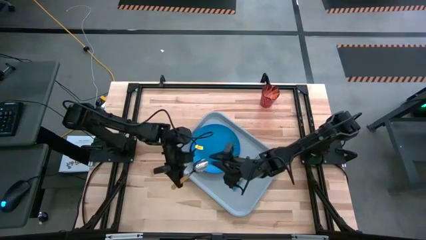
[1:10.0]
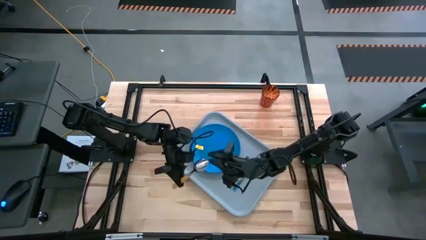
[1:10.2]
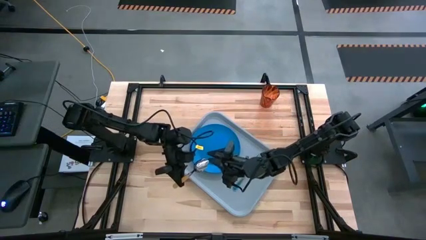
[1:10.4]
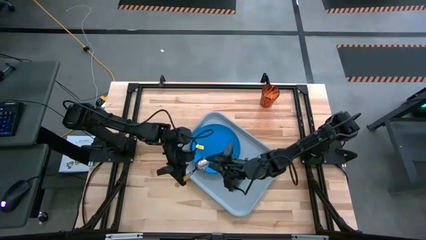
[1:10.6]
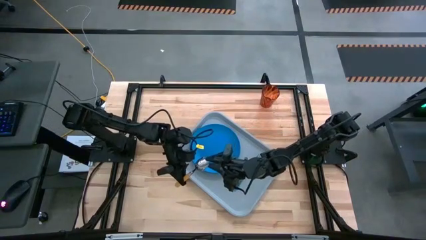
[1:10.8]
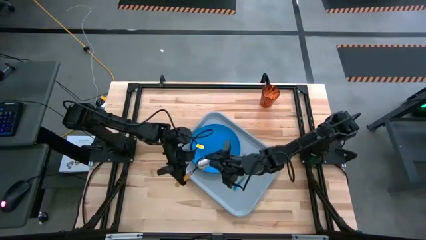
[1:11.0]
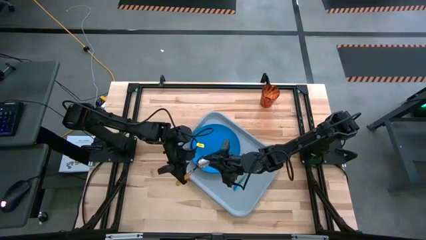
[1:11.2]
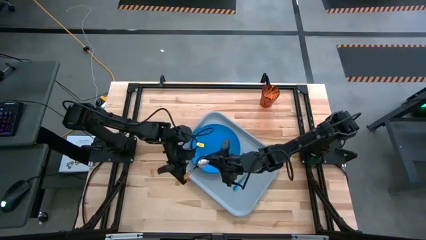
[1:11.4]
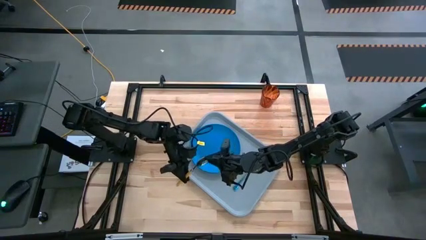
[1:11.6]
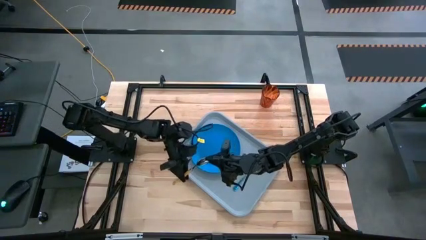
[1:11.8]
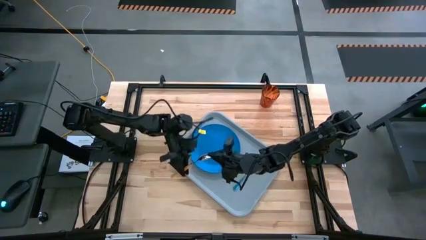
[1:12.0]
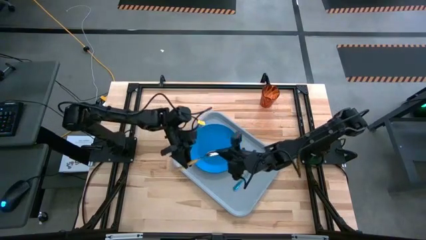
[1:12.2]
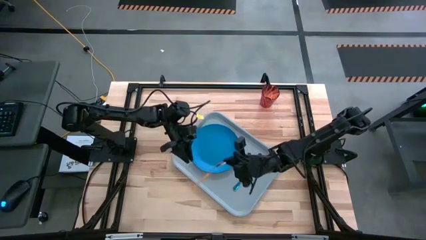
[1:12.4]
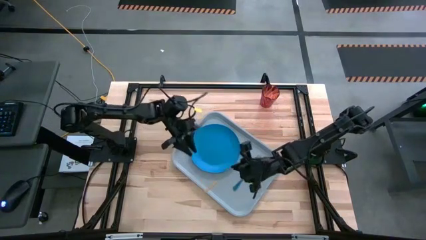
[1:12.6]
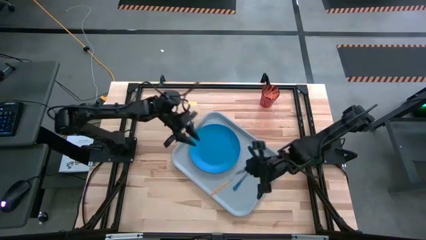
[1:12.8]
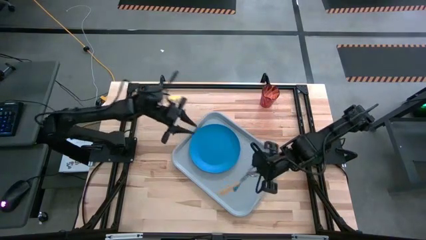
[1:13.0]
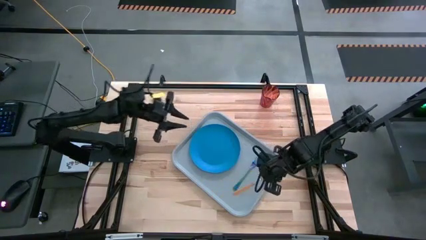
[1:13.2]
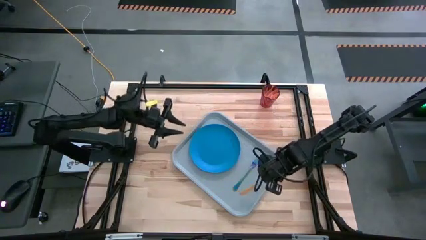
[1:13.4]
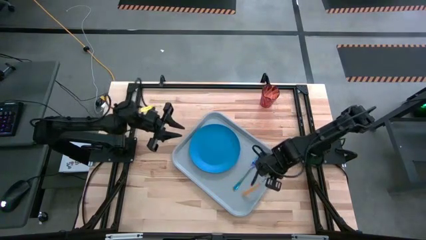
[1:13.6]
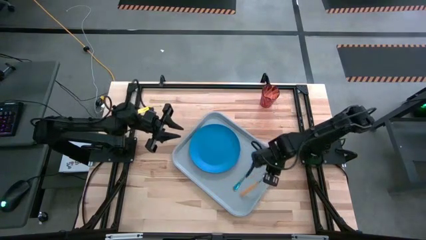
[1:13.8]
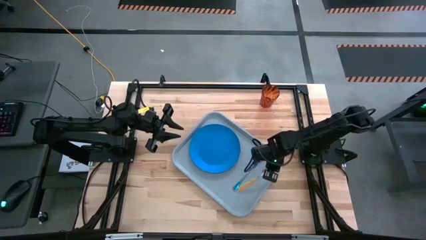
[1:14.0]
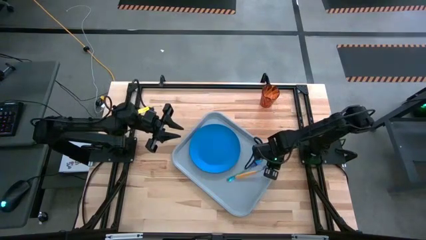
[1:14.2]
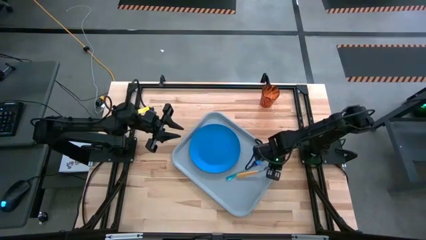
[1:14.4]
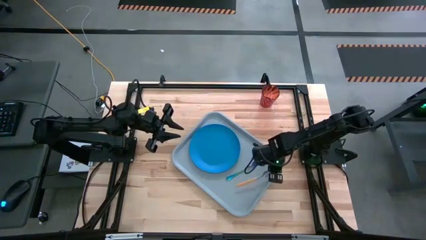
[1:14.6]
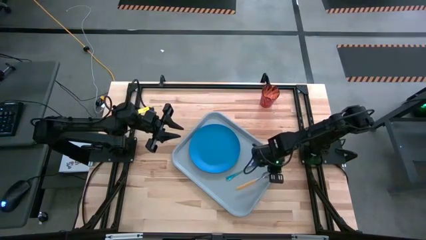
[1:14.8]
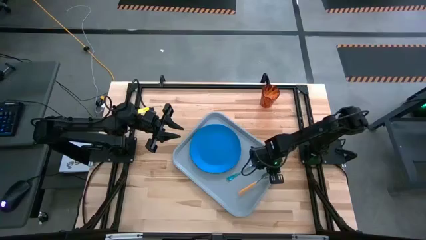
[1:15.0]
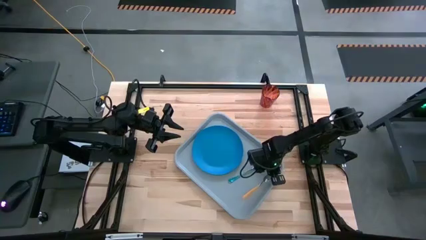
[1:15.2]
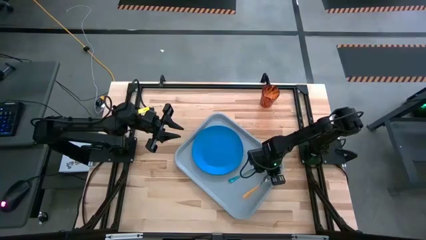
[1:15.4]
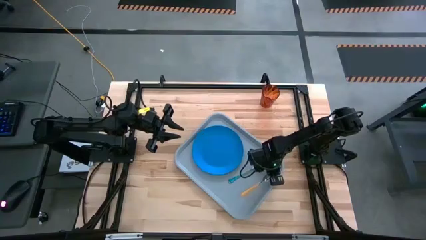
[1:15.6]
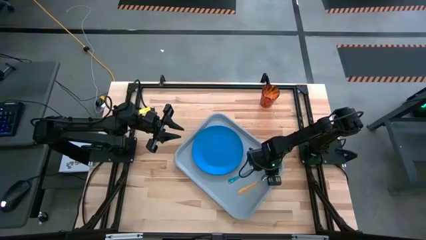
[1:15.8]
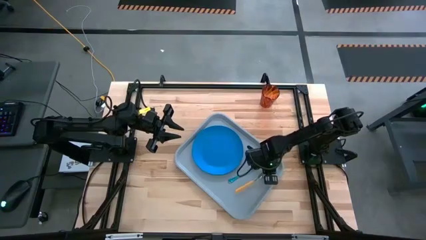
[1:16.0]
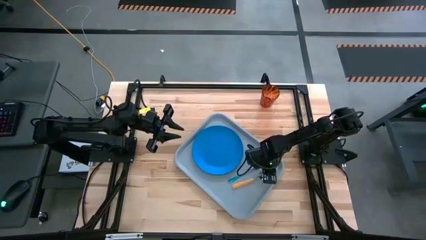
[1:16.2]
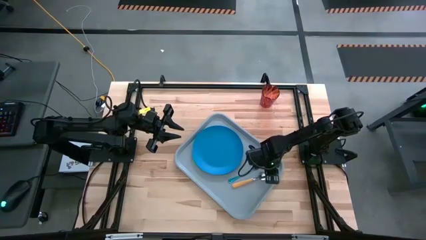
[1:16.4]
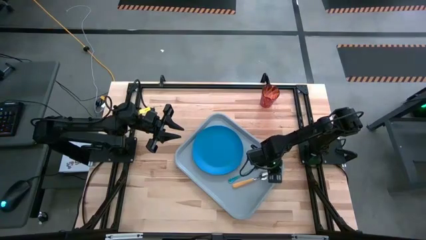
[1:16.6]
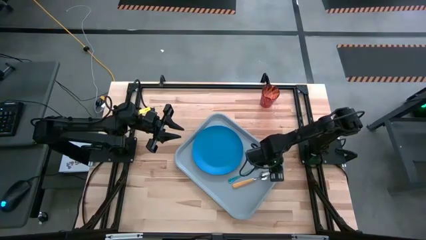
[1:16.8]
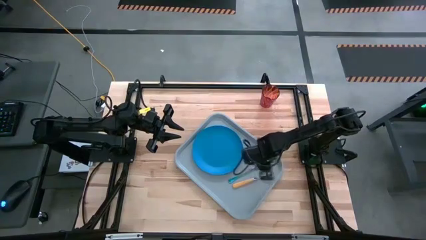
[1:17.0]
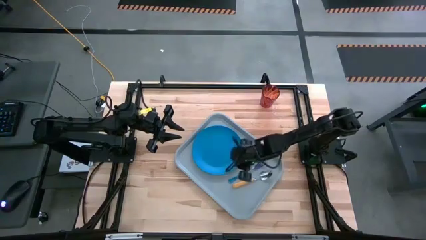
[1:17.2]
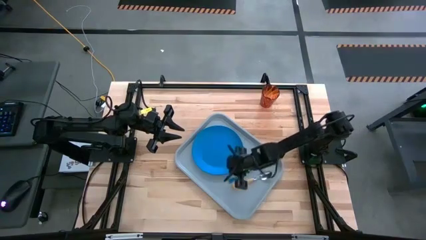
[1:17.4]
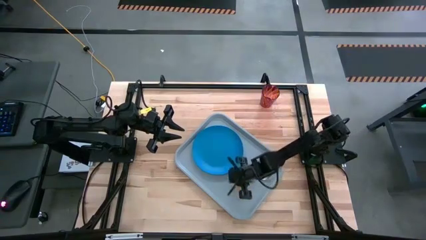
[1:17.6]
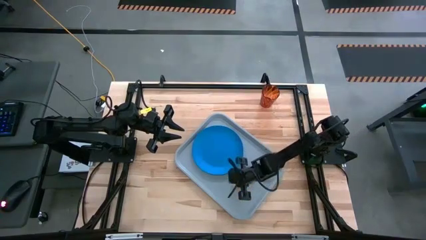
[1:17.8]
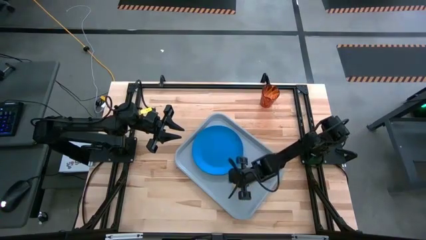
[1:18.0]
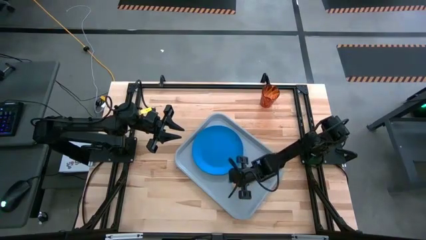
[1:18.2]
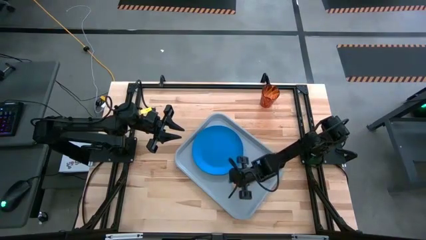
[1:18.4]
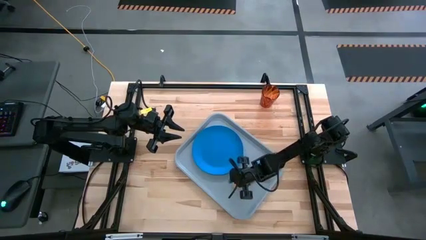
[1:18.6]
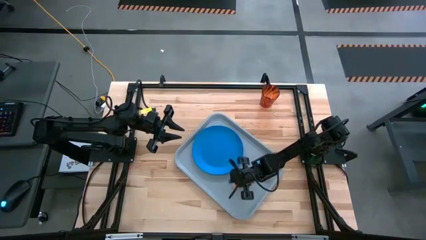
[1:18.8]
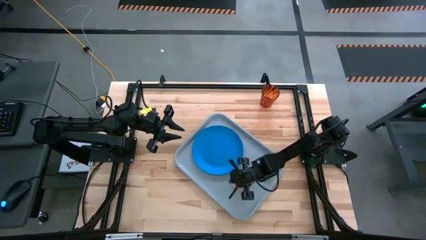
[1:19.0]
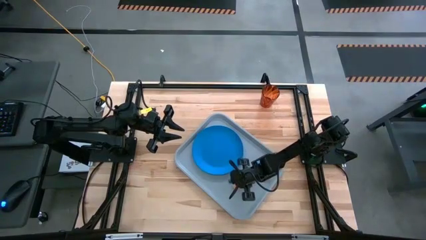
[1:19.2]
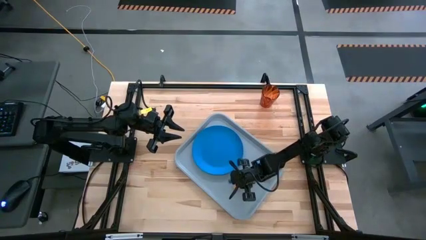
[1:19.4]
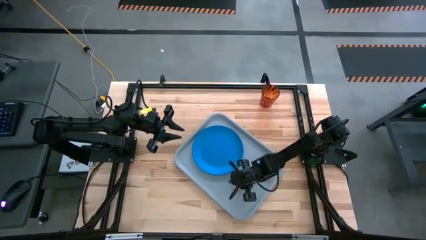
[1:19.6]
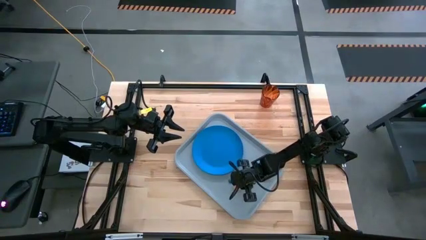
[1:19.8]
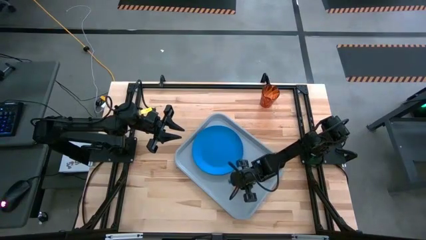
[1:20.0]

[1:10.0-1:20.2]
Task: Pick and place plate/cup/fork/spoon on tray
Put the yellow spoon on the right side of the gray serving tray

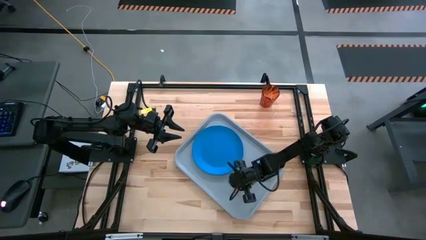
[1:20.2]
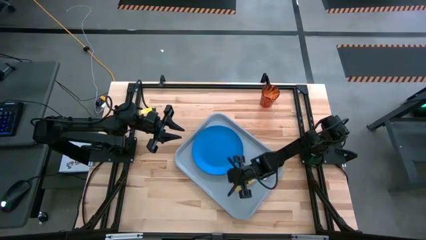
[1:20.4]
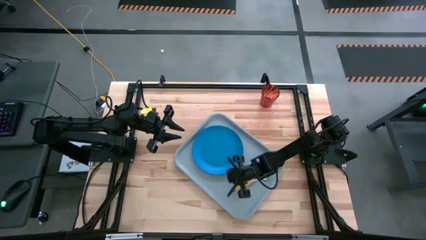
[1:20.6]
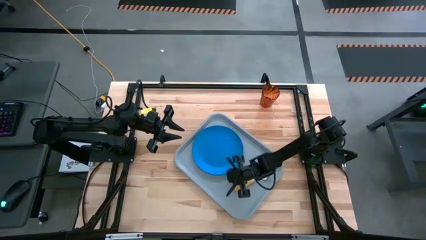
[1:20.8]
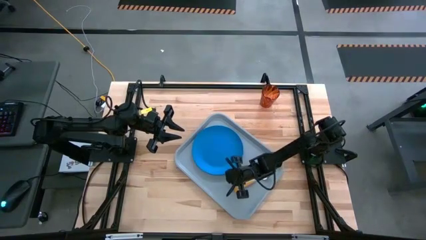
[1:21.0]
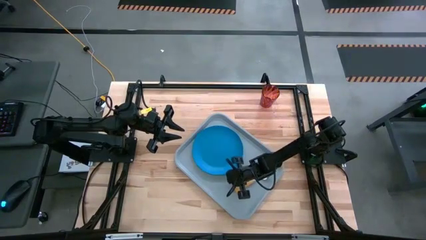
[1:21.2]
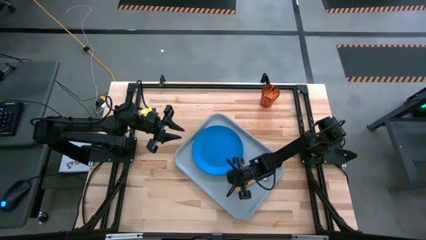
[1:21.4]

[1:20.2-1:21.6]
Adjust the blue fork on the gray serving tray

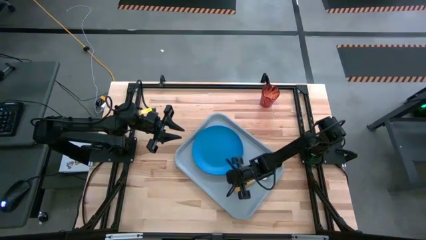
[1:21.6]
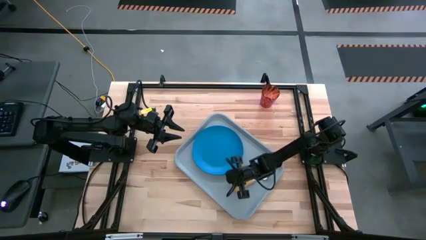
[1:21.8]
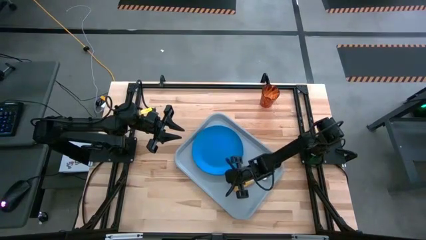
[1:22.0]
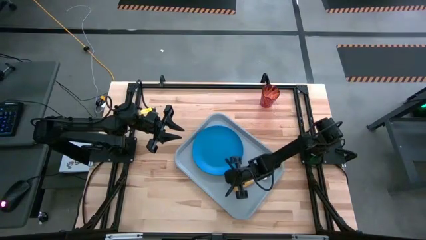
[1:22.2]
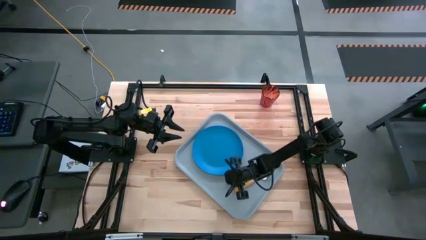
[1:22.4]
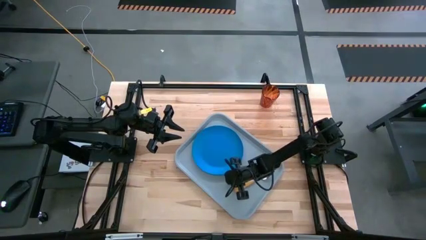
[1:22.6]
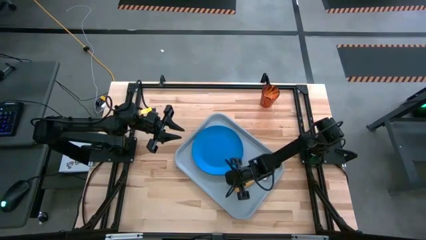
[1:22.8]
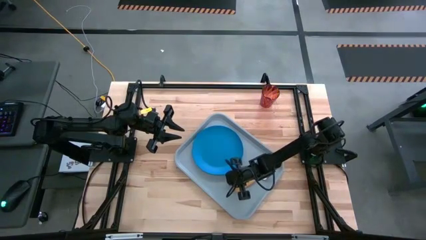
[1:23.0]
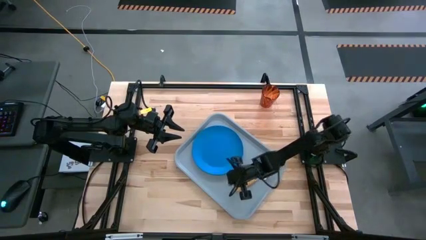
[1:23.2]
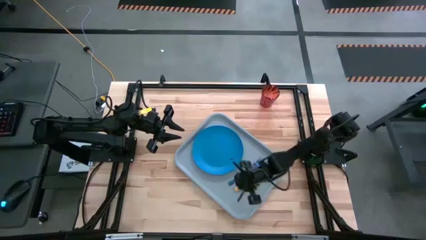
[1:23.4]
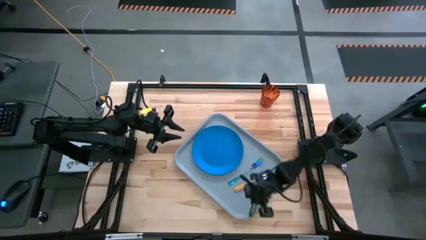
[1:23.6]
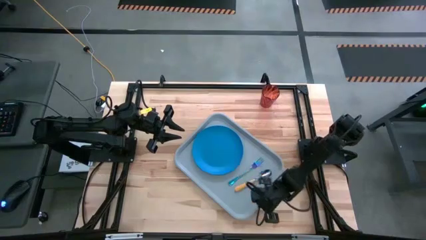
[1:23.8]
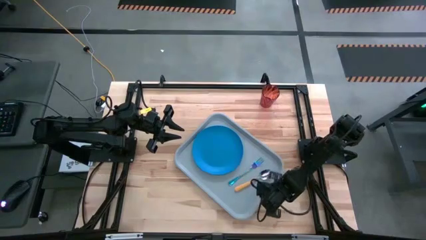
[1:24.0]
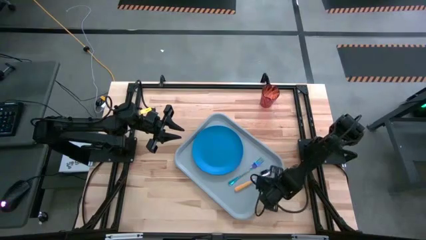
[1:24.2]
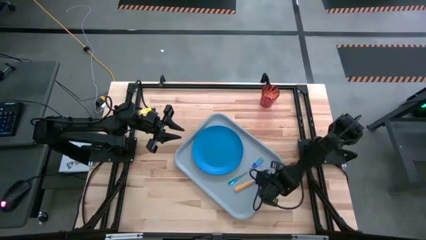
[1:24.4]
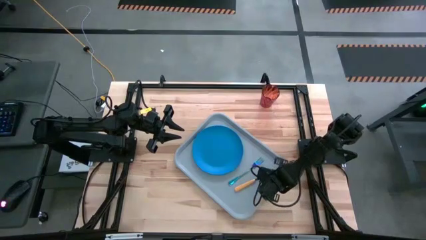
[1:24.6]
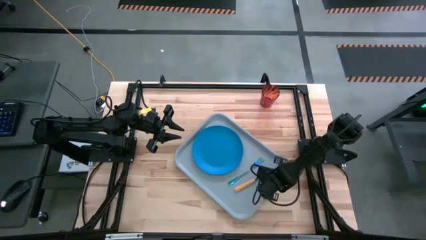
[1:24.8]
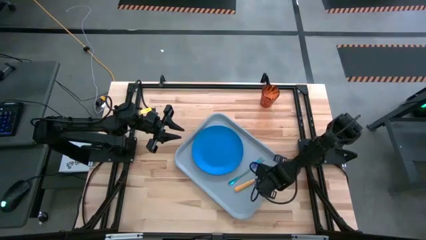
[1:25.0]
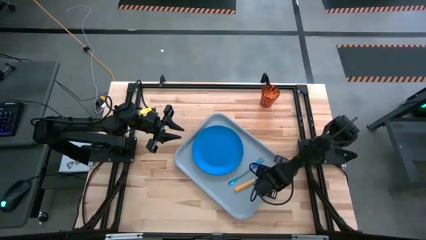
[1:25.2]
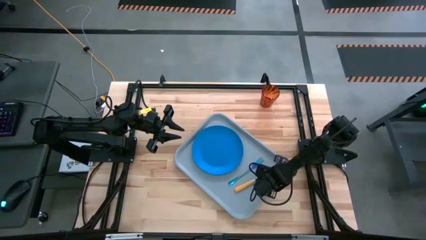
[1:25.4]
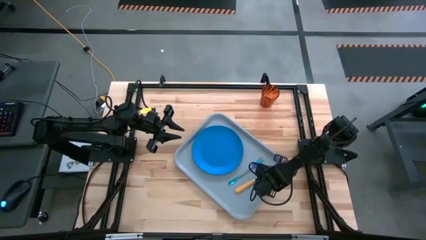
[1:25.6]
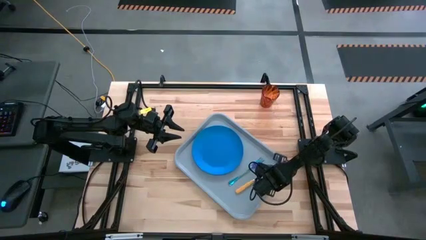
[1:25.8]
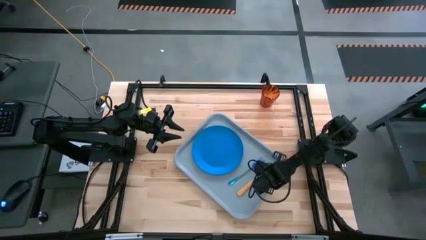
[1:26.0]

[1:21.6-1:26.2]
Adjust the yellow spoon on the gray serving tray
